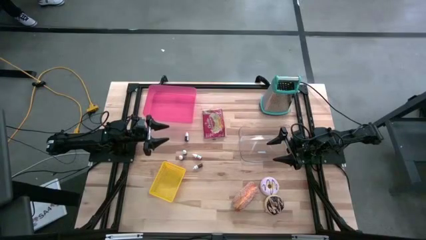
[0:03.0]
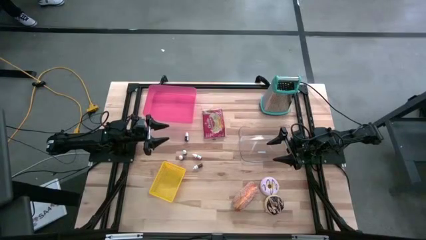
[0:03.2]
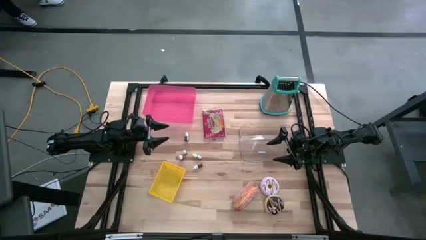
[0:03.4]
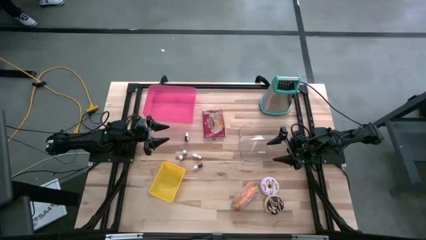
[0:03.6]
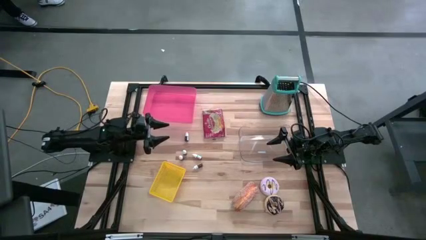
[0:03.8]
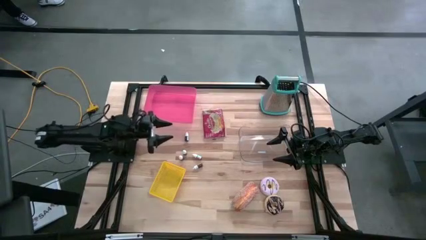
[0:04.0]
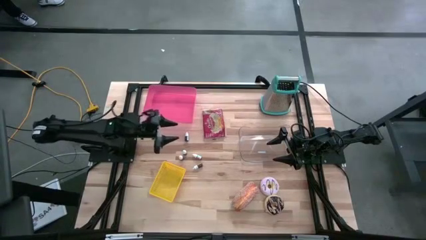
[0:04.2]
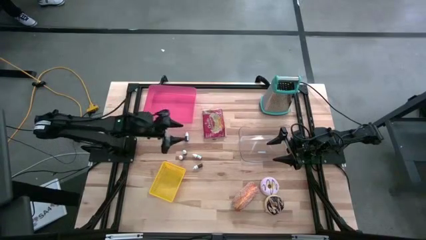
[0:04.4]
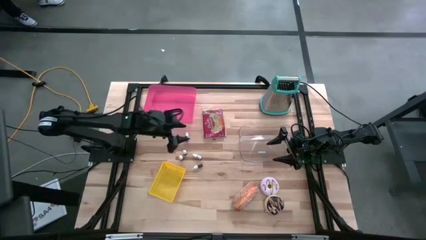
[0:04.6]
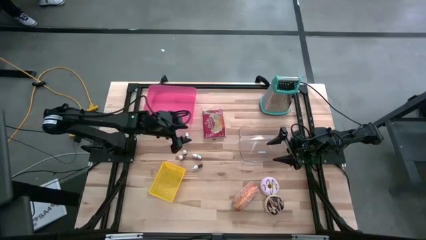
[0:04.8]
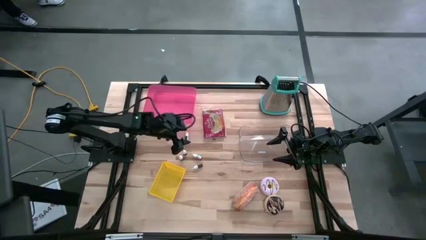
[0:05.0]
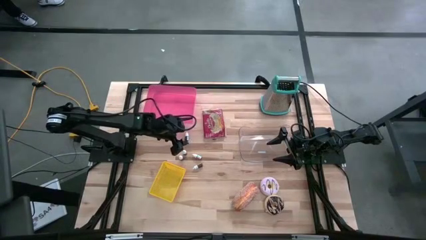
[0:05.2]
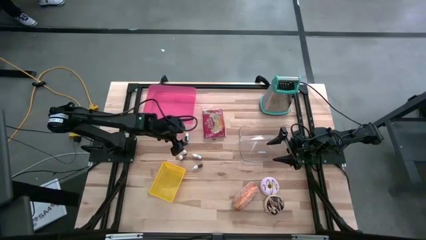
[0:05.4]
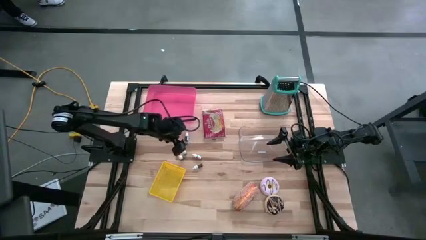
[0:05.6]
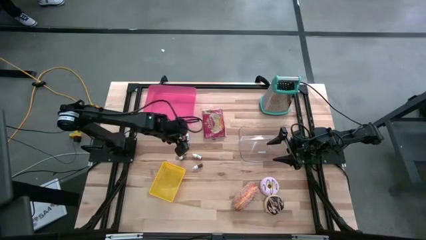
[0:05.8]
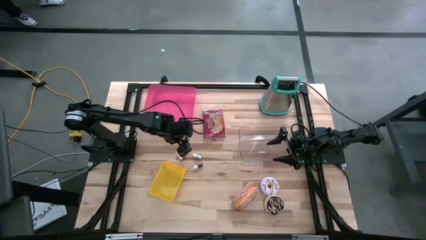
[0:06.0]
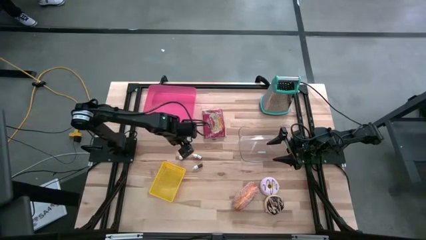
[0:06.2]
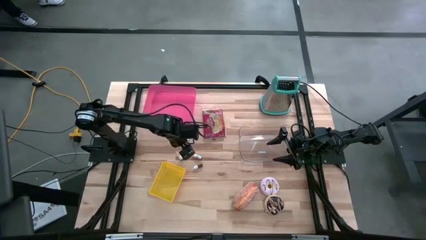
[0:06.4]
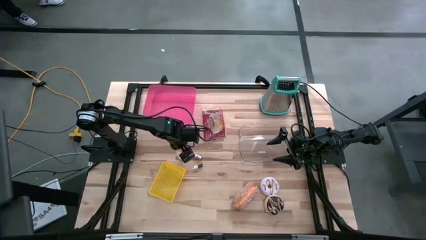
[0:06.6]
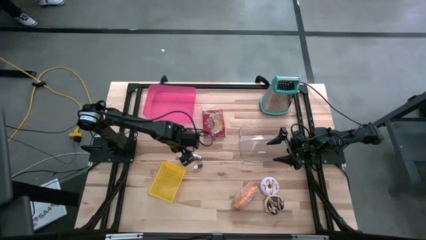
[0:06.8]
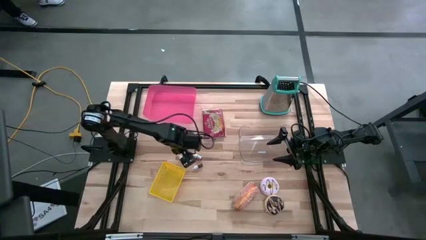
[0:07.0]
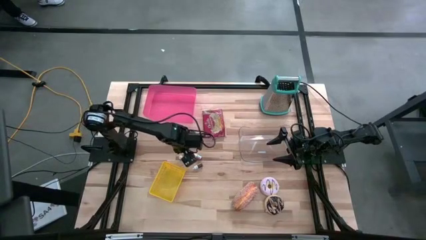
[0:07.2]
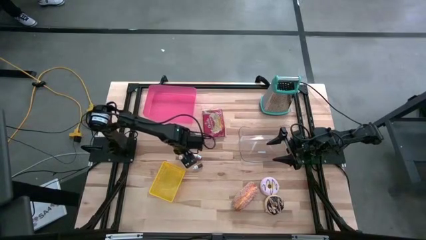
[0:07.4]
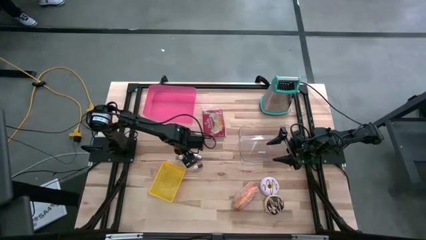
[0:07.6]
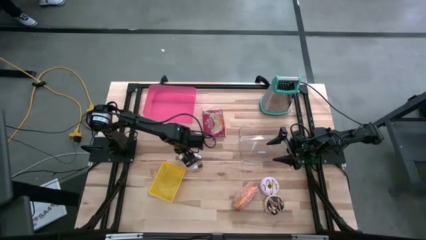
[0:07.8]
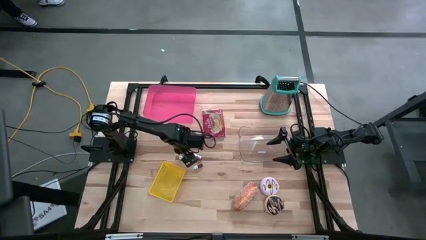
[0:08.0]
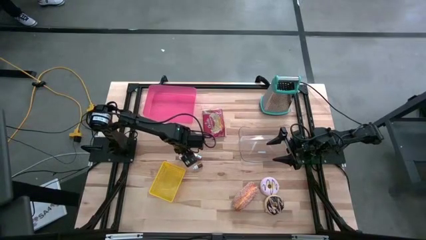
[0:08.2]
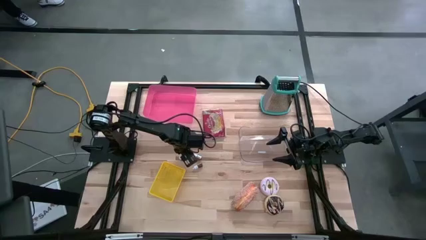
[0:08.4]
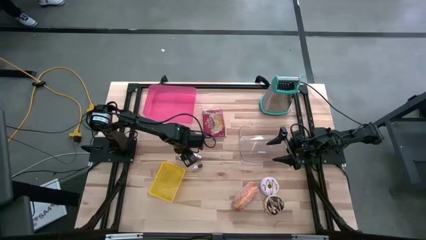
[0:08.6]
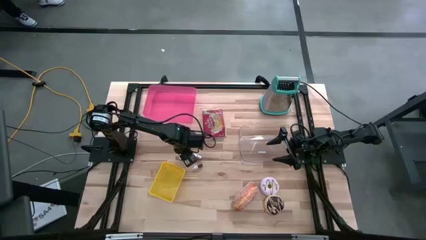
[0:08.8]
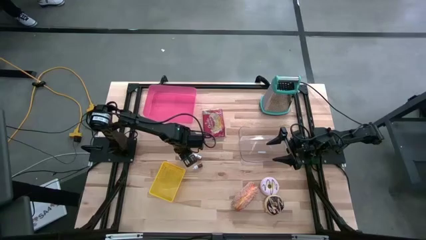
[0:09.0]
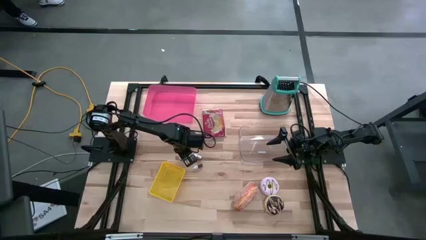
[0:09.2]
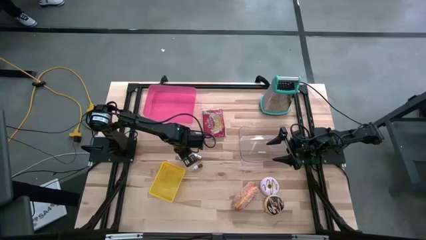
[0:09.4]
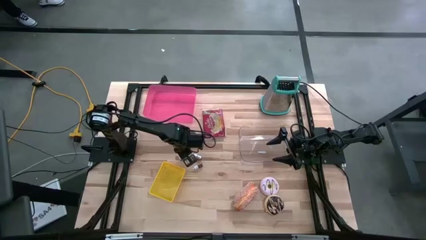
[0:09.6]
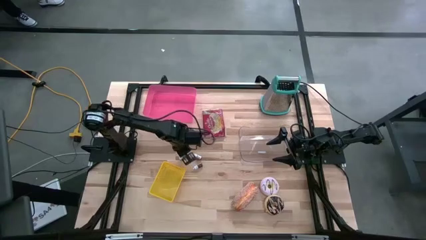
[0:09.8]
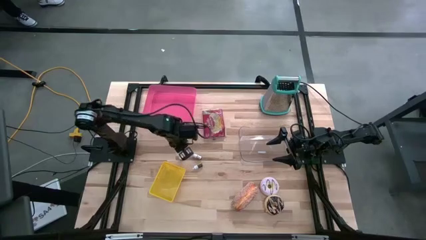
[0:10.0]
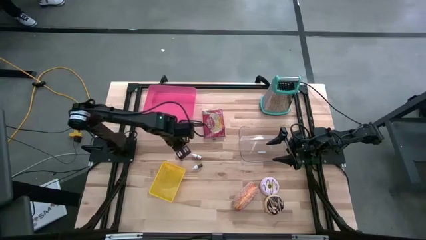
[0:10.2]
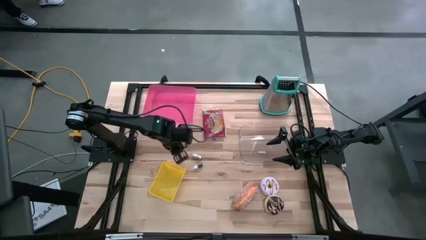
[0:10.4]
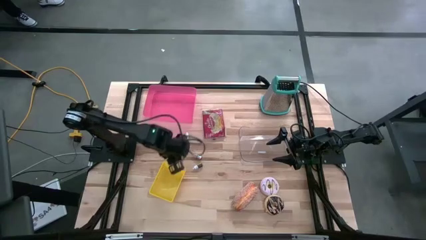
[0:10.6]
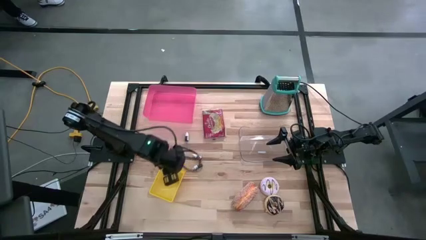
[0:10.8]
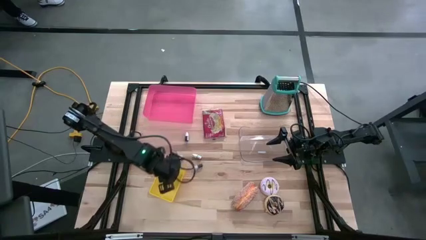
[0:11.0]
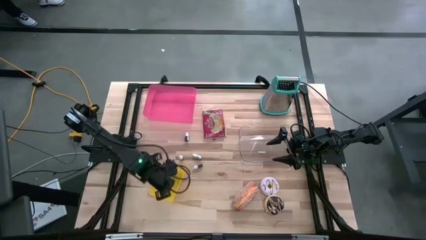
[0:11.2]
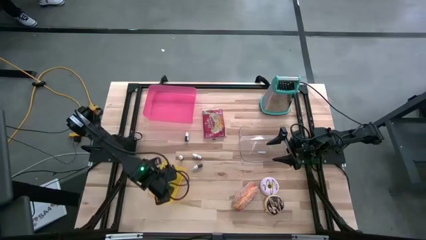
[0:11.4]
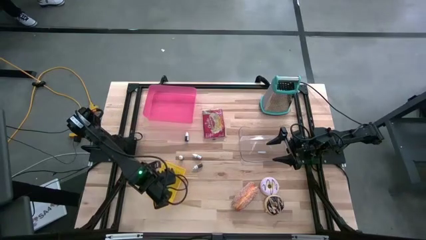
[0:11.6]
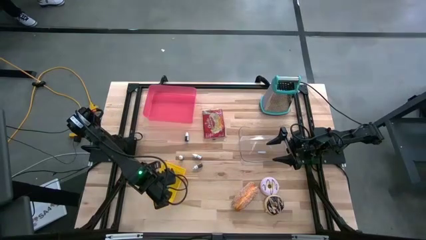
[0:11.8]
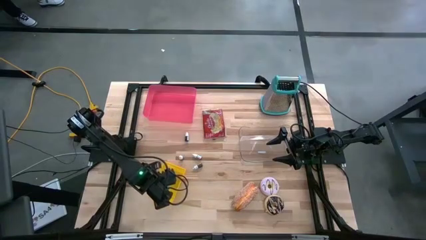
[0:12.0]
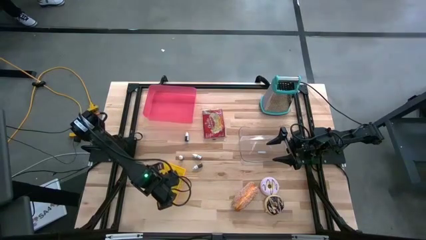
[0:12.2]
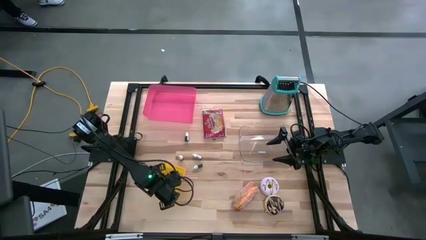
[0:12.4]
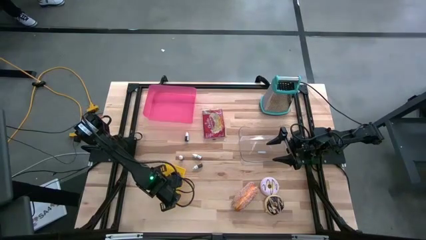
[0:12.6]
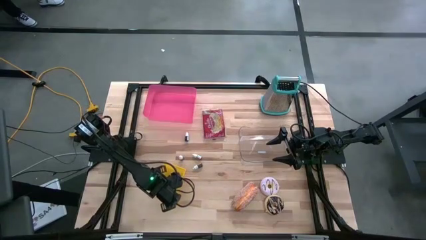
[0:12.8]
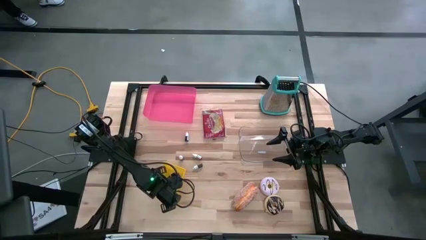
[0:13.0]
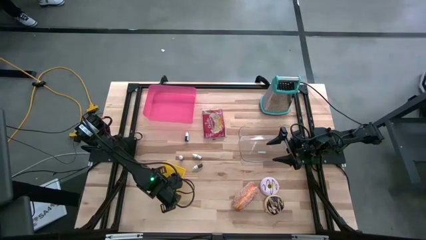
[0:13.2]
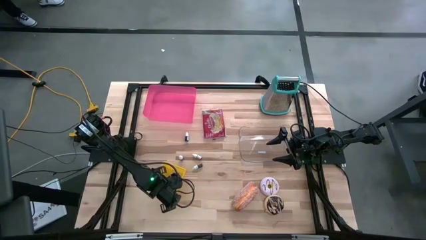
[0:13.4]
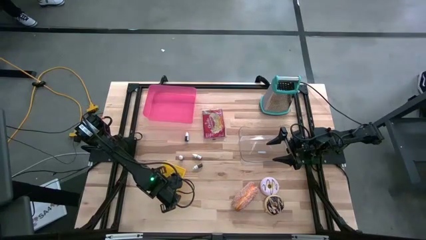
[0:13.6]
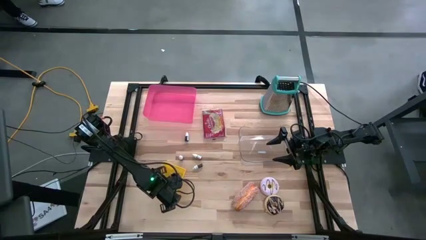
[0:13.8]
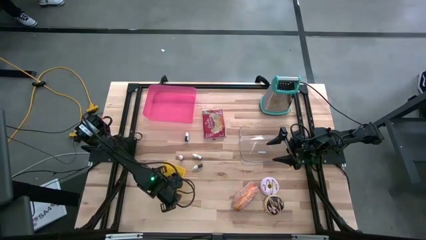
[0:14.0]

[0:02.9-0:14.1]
Put the blue food coloring bottle into the yellow bin
